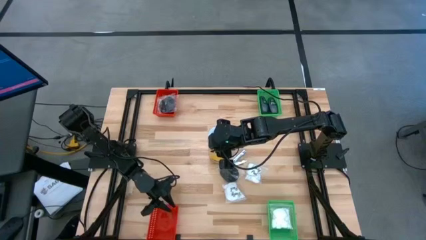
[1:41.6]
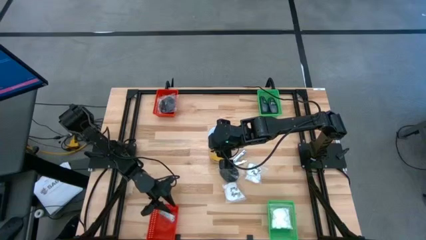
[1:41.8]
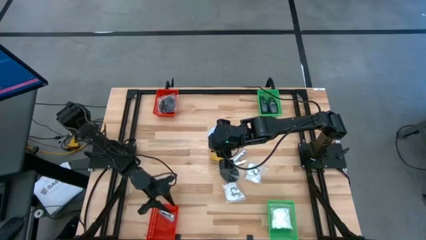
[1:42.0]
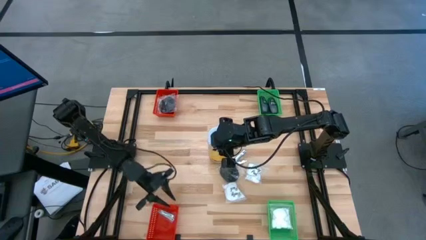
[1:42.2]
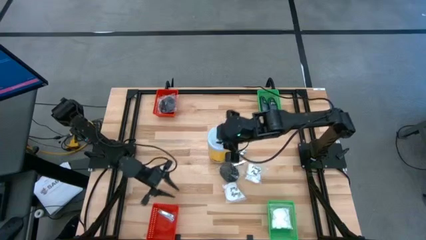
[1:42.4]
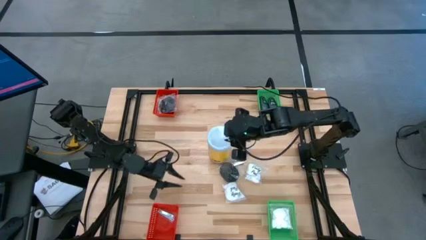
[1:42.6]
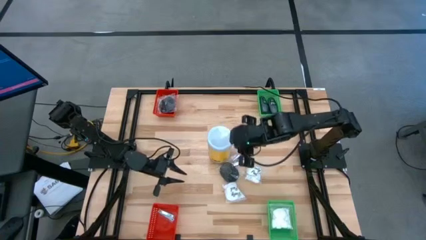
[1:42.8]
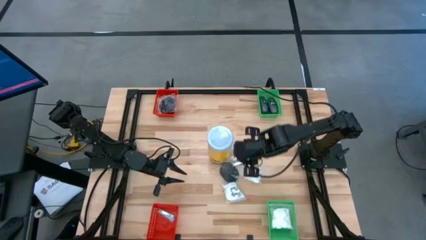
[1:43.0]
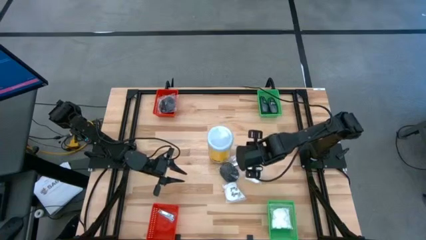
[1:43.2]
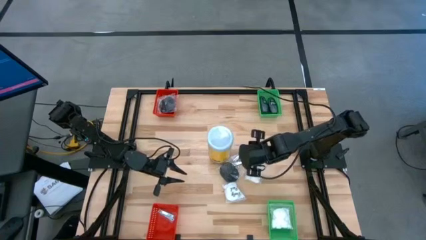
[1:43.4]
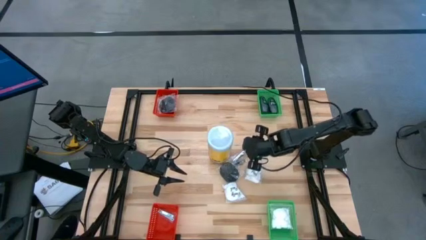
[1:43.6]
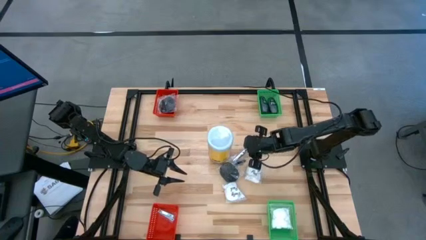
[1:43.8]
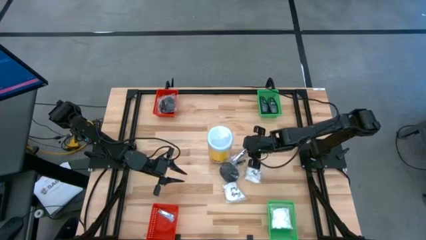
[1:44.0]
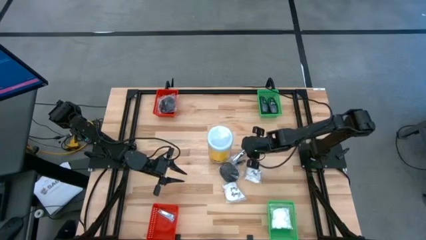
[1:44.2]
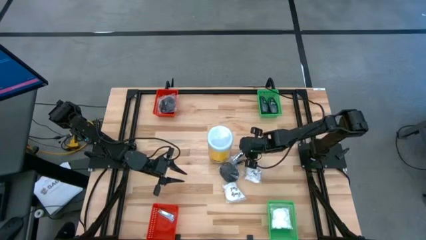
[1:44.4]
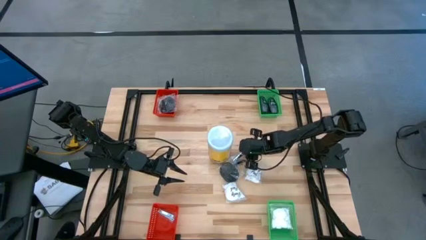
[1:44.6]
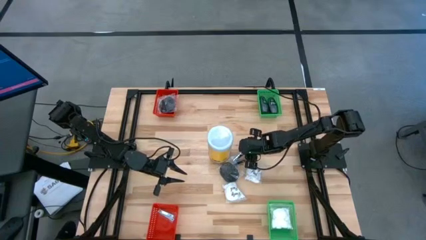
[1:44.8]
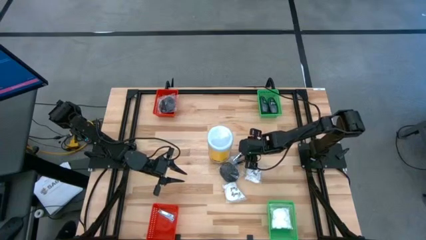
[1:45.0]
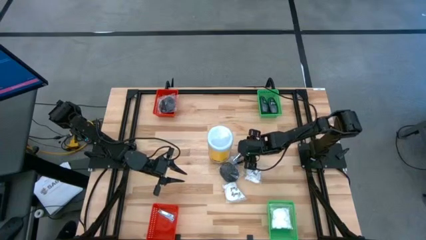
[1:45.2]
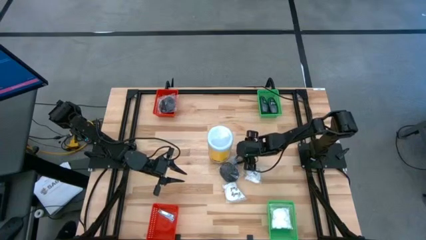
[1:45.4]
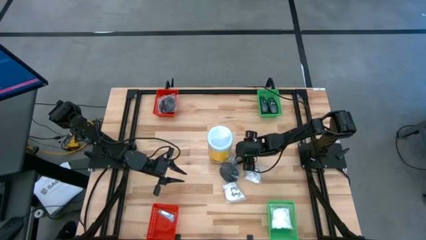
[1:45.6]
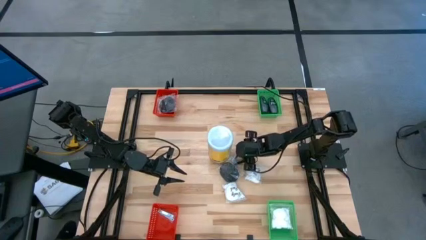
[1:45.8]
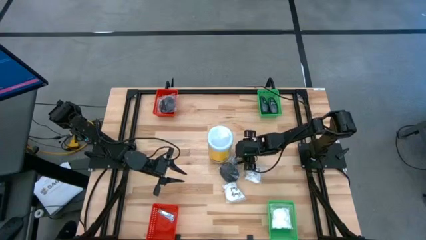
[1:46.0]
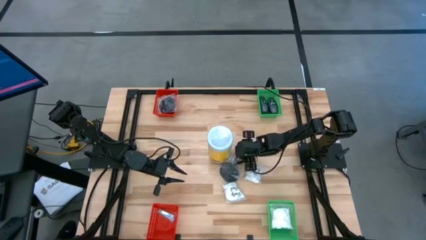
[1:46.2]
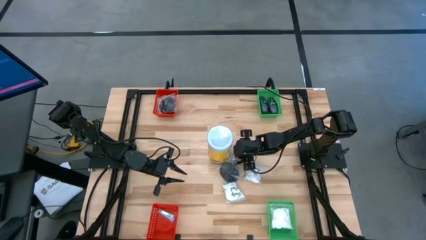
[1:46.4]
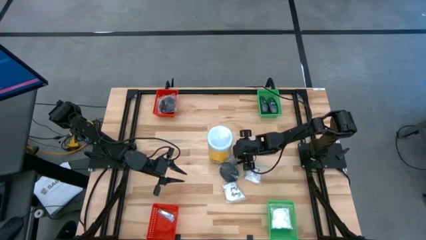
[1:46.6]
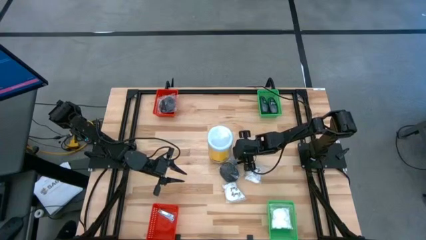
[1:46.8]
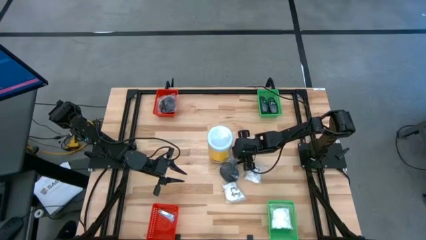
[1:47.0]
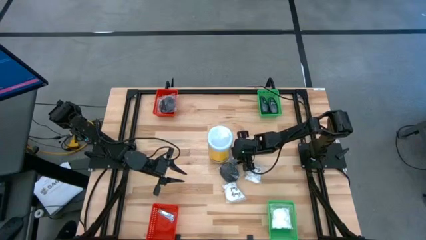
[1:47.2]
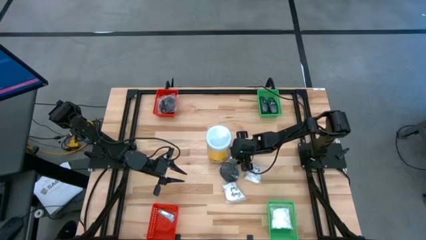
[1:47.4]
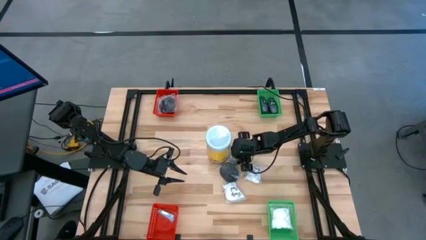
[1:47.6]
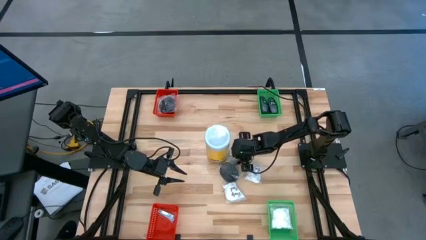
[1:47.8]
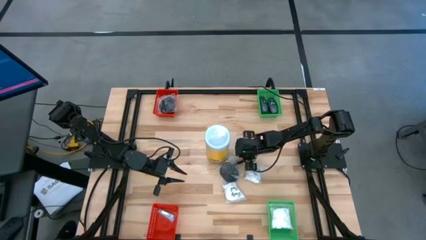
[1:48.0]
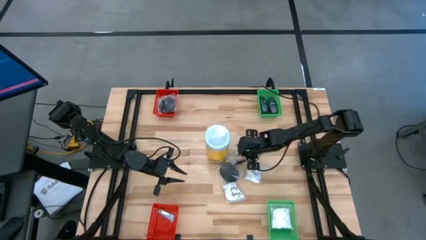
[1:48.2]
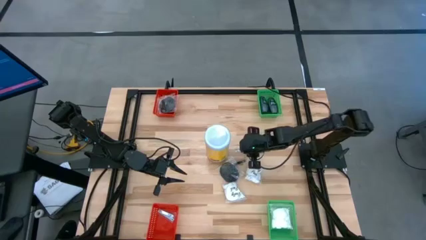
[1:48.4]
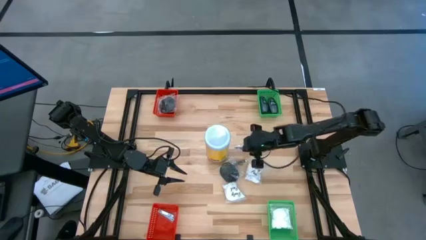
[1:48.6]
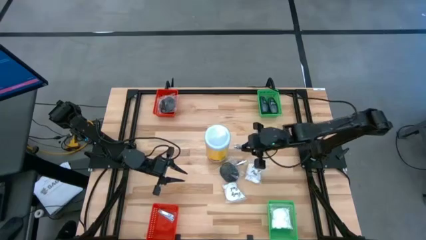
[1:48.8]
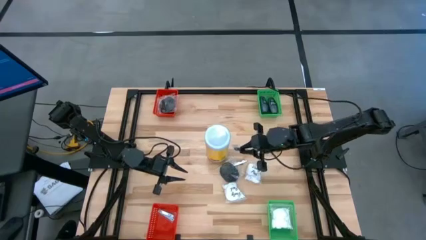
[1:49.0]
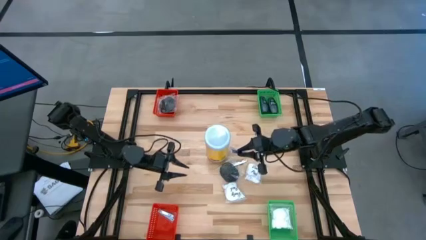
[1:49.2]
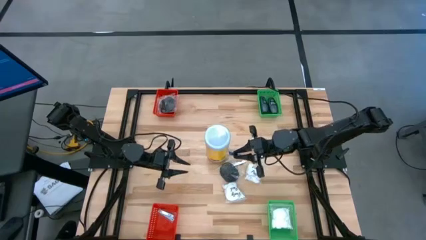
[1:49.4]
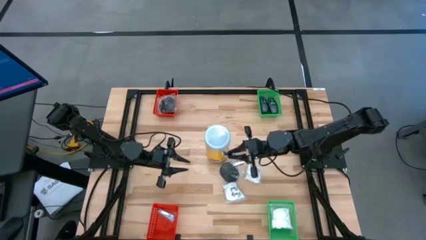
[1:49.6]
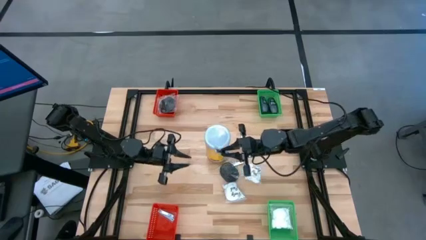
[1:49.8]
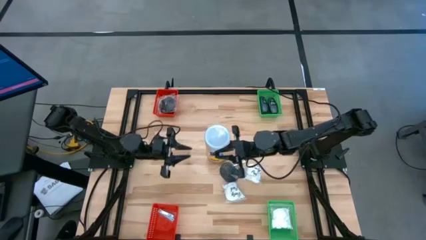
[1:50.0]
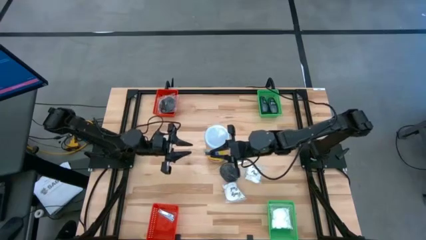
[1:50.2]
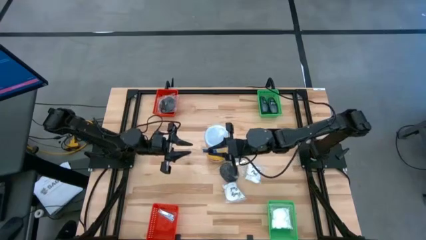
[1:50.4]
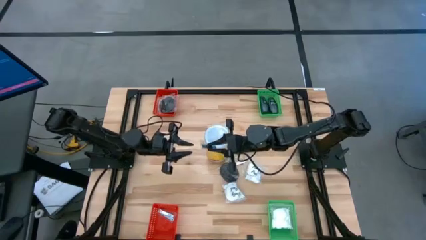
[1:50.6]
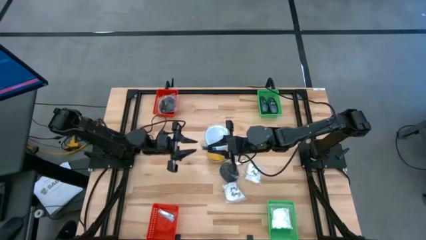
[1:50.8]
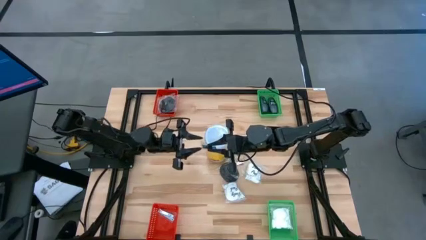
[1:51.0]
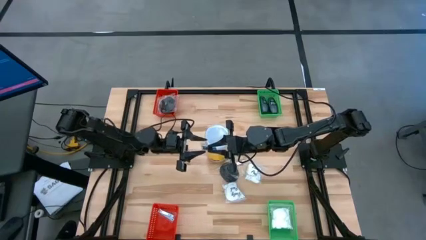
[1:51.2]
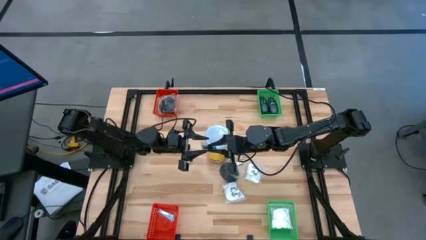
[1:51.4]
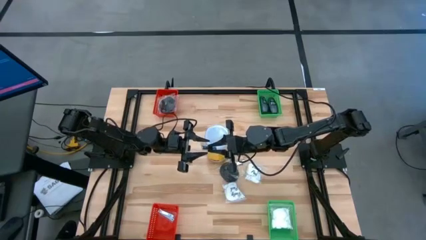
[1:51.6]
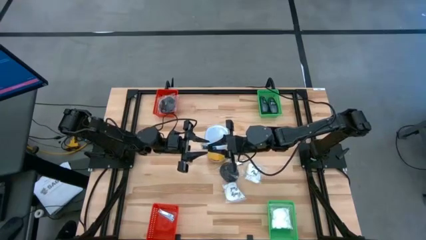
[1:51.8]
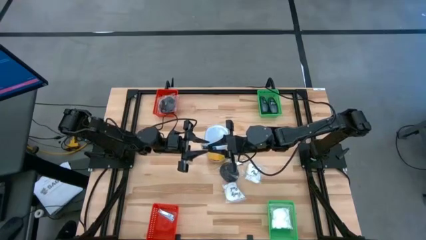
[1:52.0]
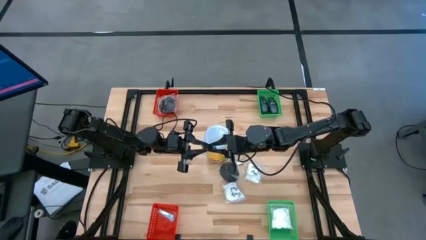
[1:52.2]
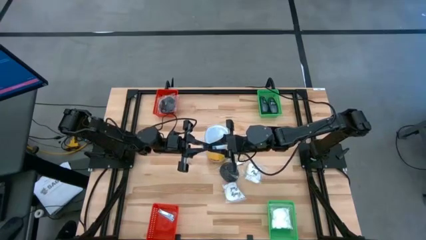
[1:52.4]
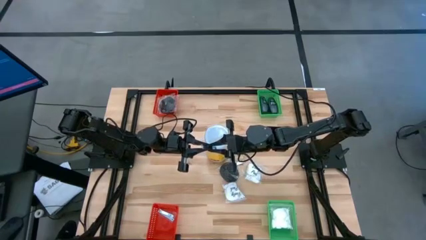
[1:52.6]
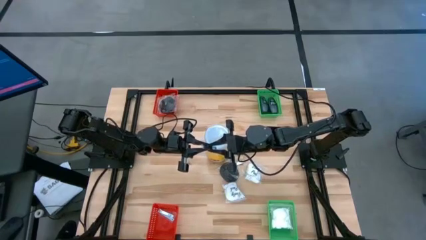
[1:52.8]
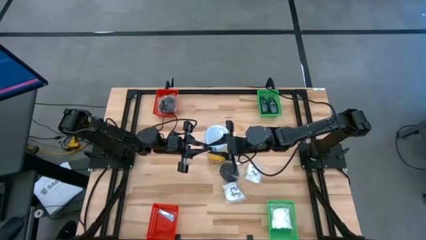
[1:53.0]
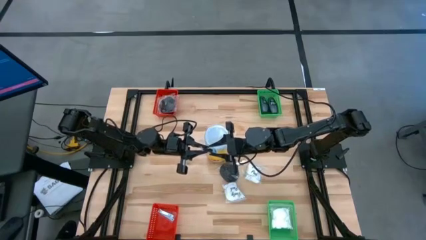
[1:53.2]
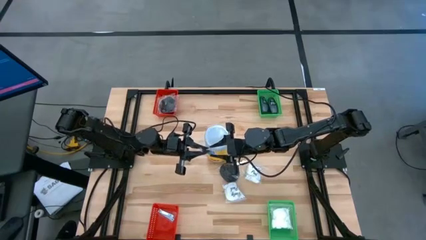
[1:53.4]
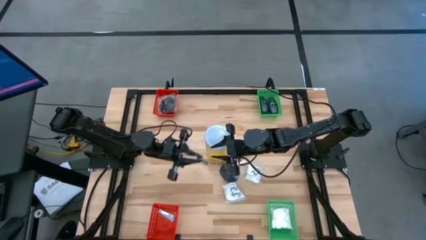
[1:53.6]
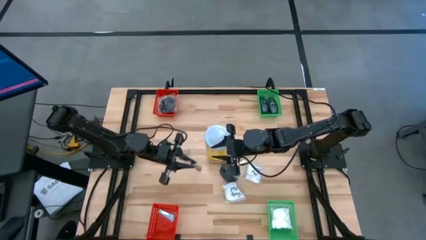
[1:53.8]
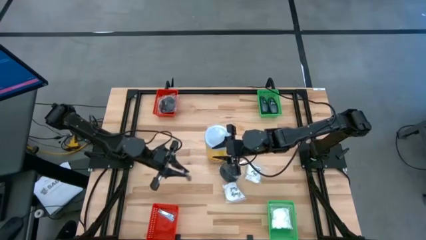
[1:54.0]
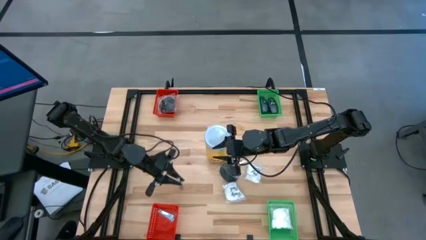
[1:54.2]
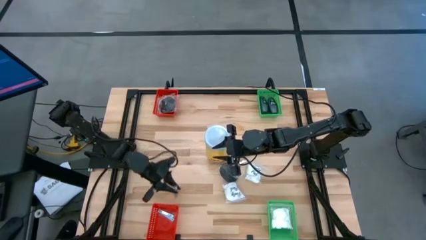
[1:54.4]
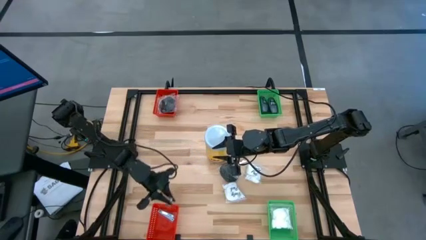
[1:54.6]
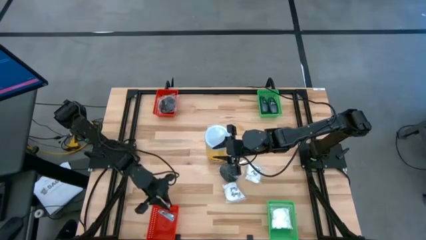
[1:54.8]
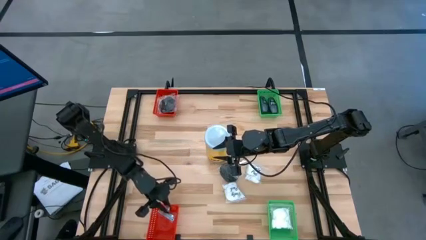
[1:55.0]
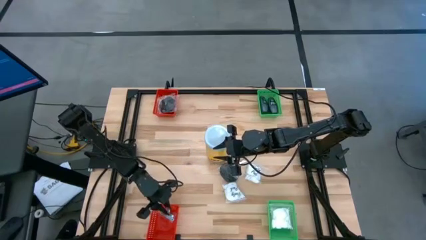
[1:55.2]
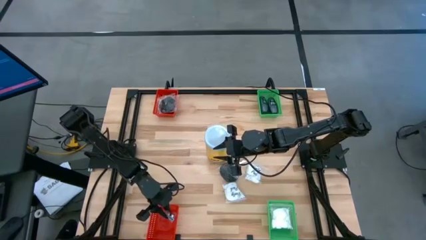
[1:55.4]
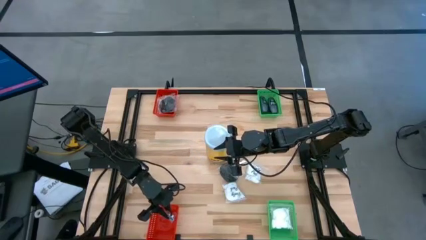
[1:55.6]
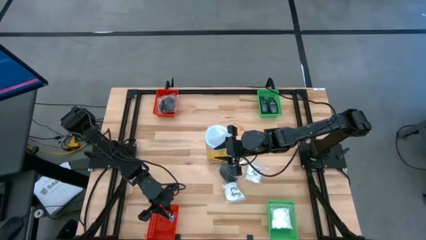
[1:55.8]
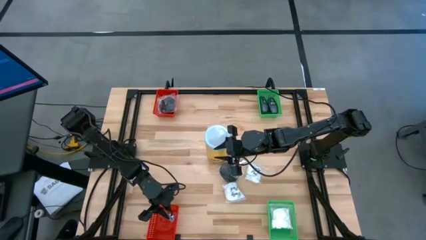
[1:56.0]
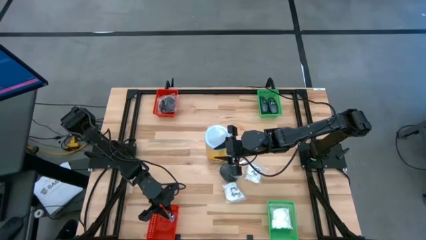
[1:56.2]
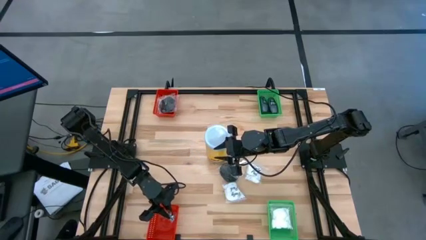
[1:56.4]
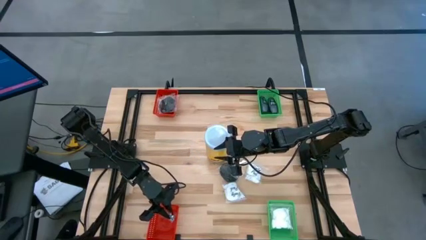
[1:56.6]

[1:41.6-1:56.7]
Task: Pick & Place Travel size toiletries
Put the nail cutter into the bottom orange bin

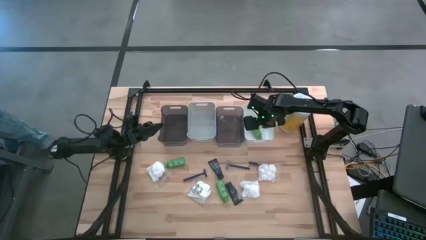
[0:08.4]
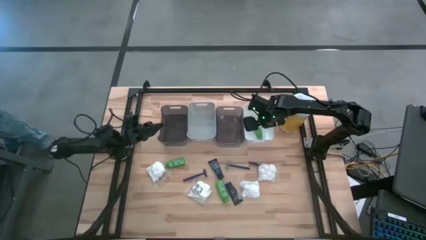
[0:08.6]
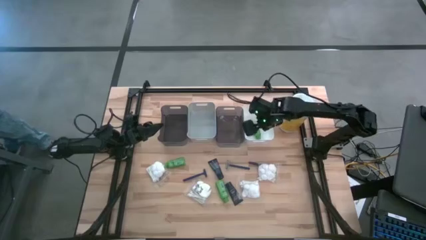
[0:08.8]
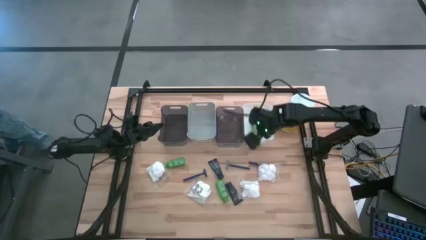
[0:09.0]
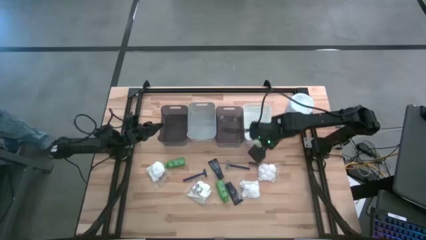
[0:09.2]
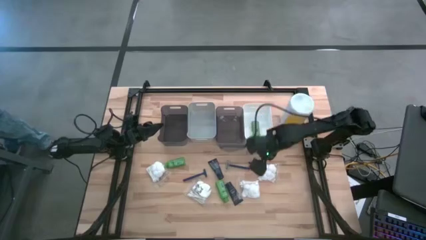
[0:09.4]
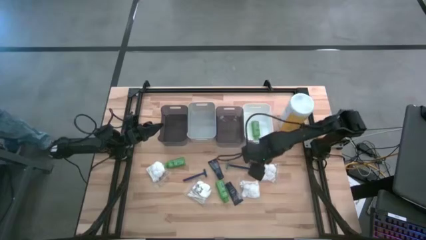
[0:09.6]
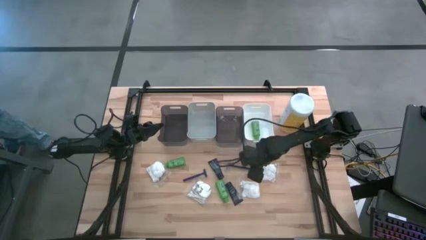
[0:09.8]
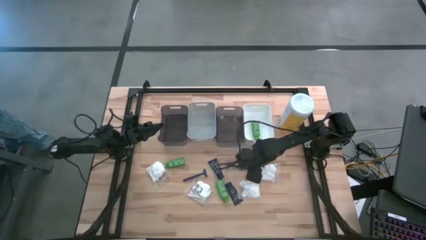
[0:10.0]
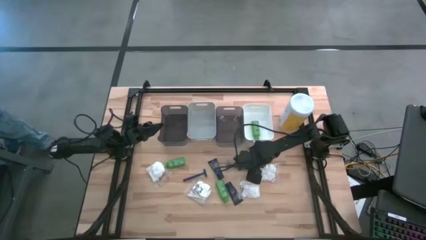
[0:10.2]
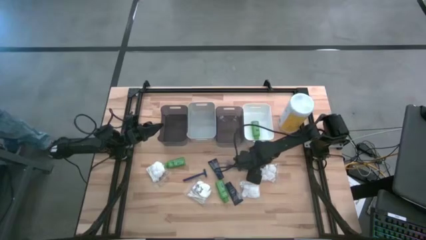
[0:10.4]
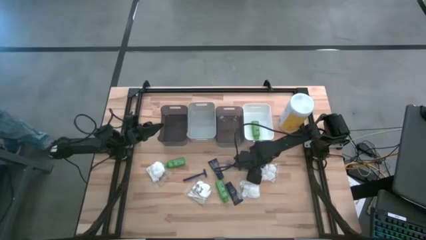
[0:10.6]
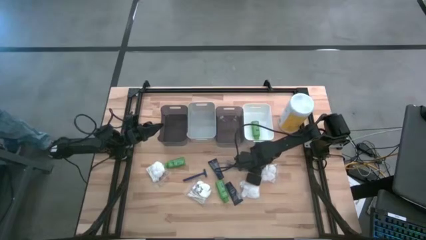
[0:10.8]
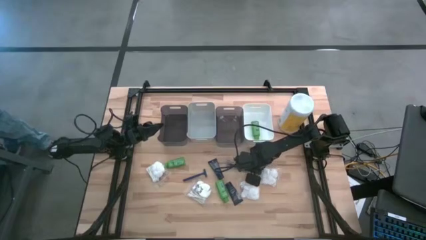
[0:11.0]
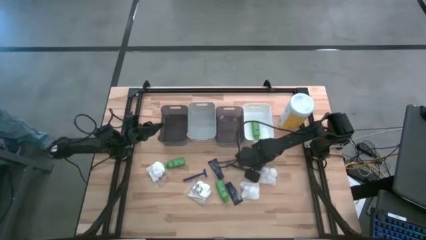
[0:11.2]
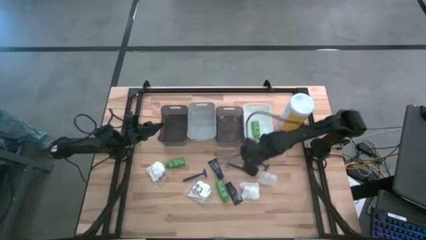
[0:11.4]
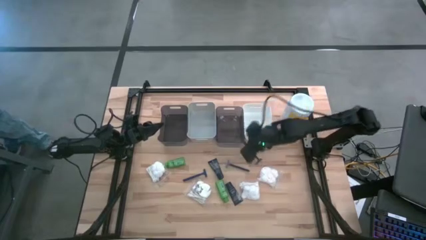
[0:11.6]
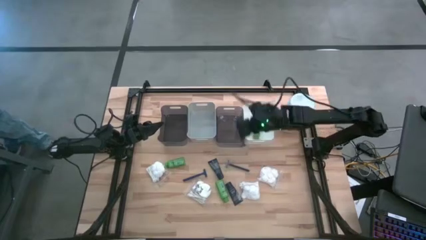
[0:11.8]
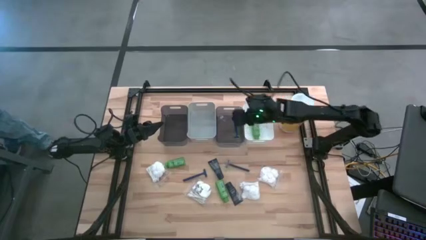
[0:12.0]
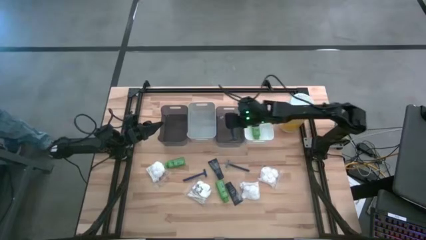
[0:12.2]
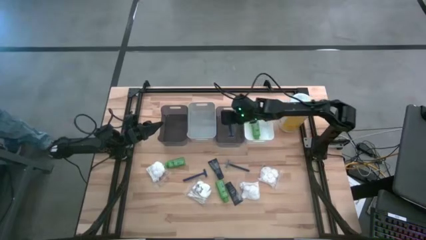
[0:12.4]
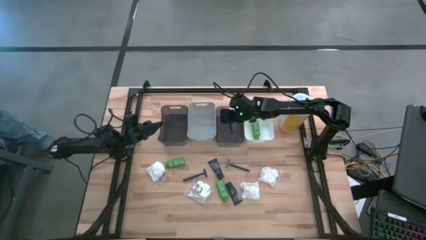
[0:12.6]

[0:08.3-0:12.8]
Task: Pick & Place Travel size toiletries
Put the blue razor into the right black bin
